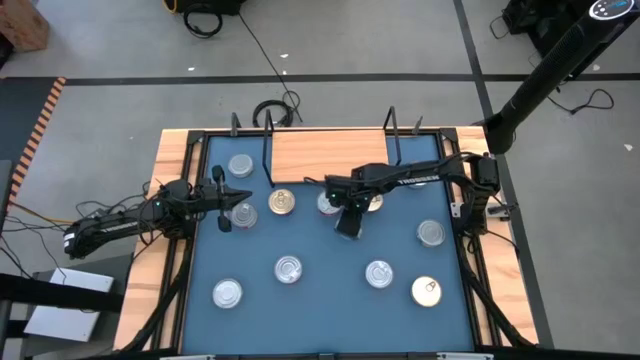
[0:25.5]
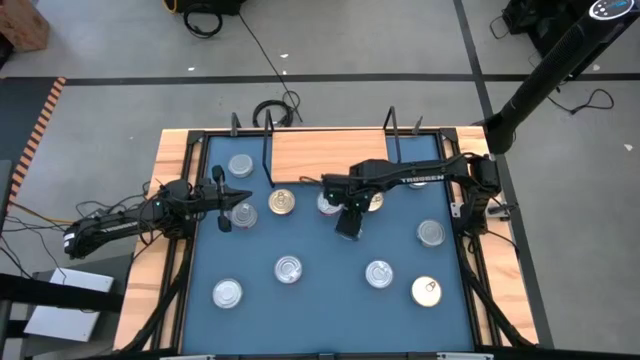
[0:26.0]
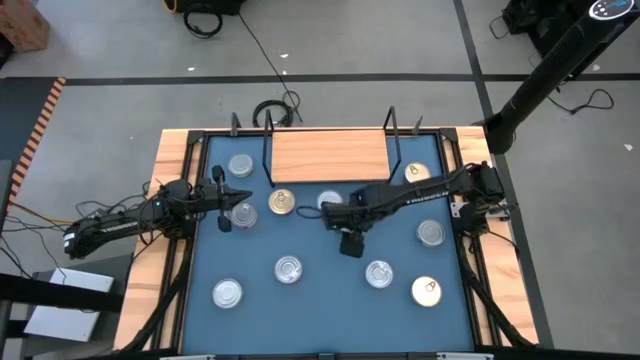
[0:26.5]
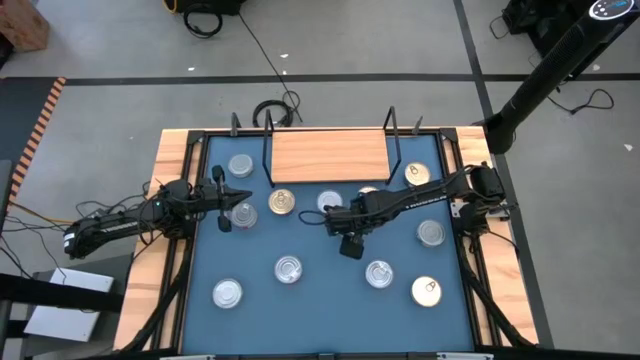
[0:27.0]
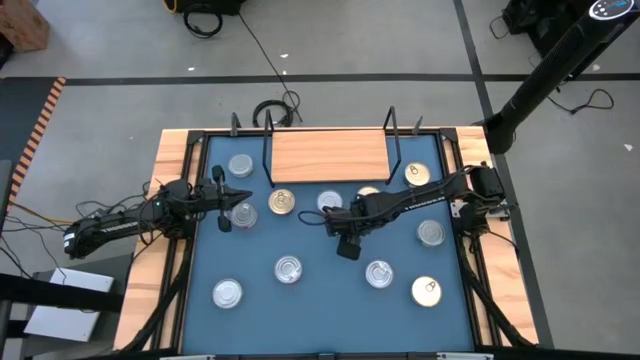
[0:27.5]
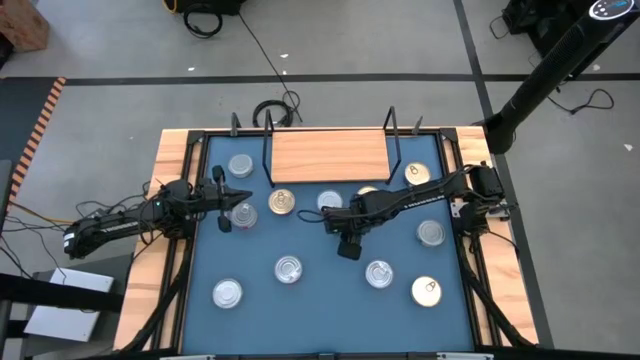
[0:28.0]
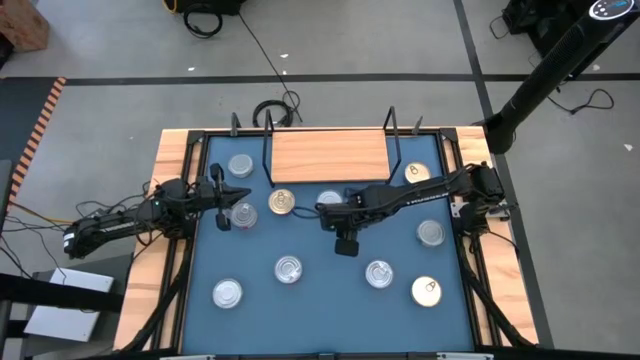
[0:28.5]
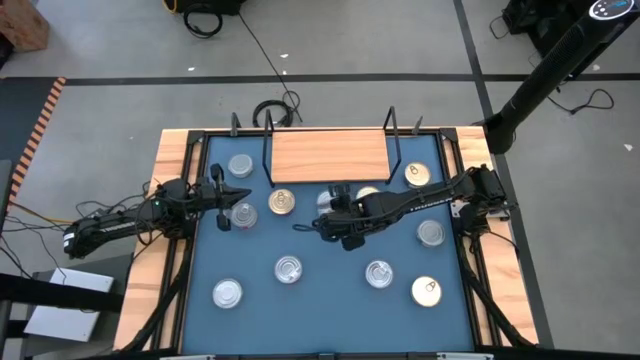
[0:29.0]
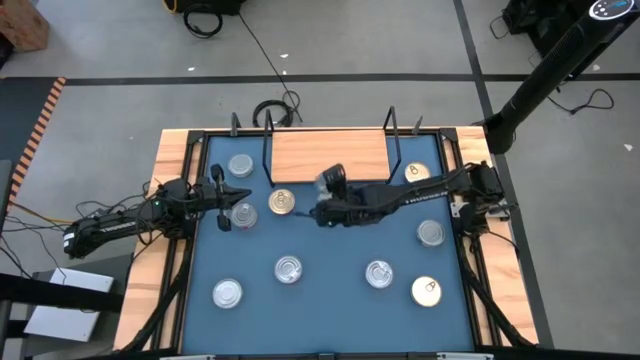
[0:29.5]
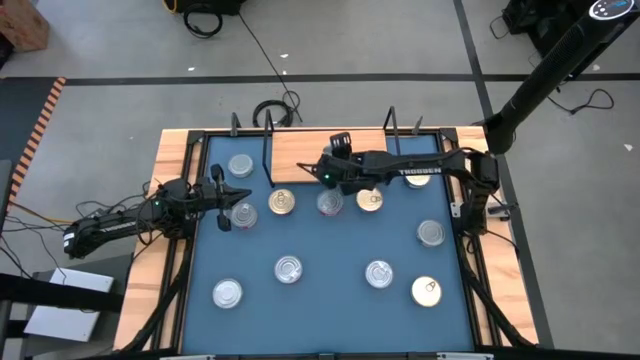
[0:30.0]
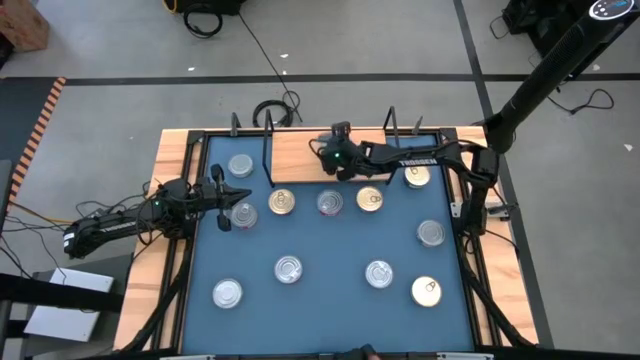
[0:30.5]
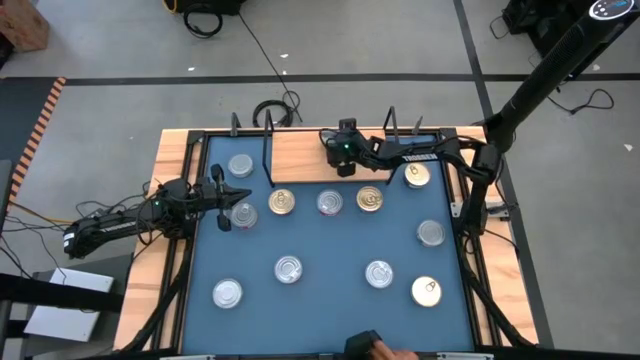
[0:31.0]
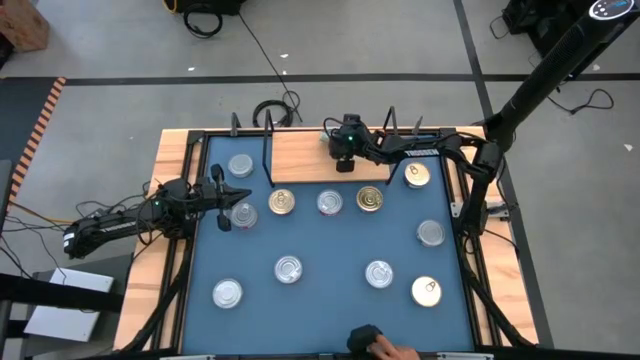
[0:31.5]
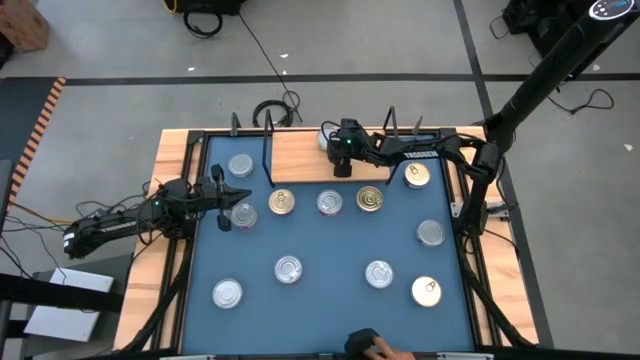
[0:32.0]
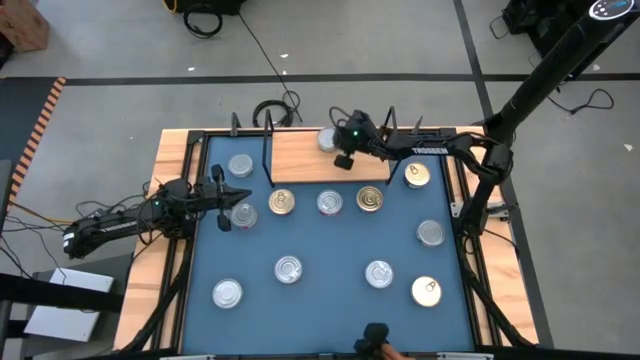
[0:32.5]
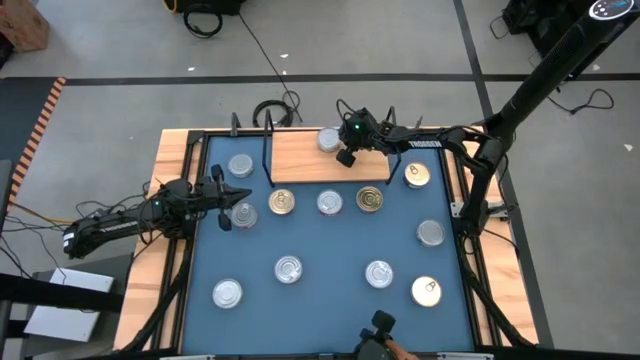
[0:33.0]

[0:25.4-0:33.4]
Task: Stack canned seafood by type on shelf
Put the green tuna can on the shelf

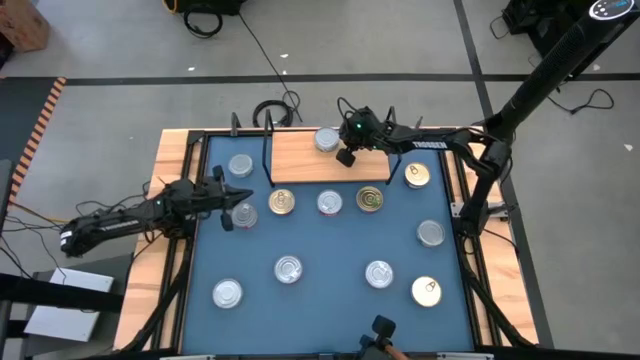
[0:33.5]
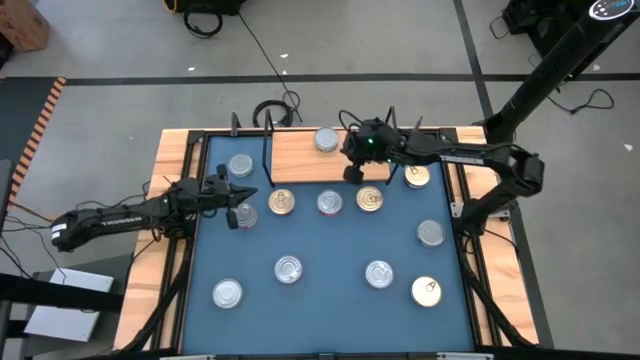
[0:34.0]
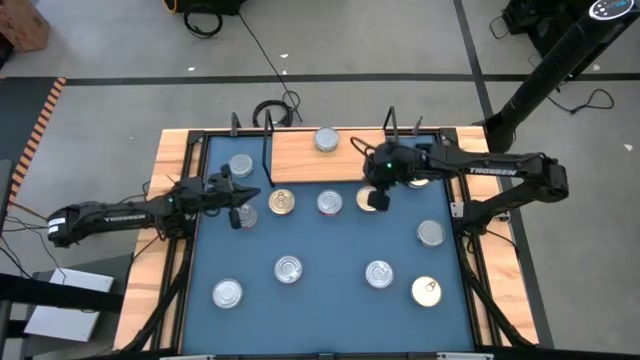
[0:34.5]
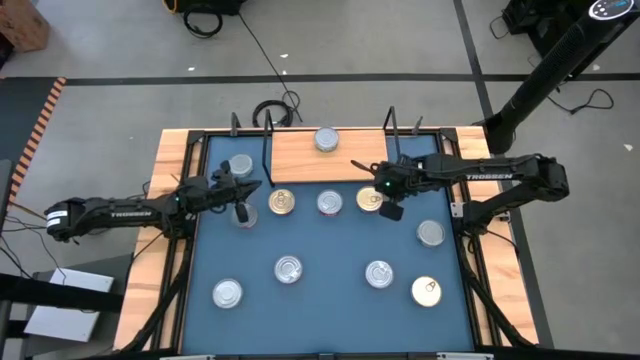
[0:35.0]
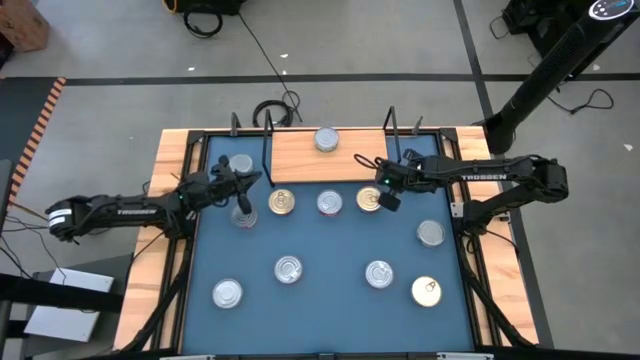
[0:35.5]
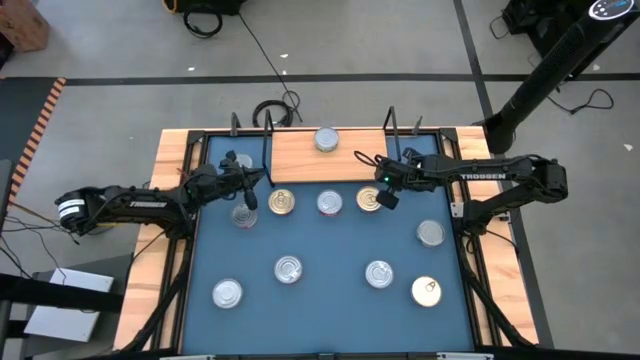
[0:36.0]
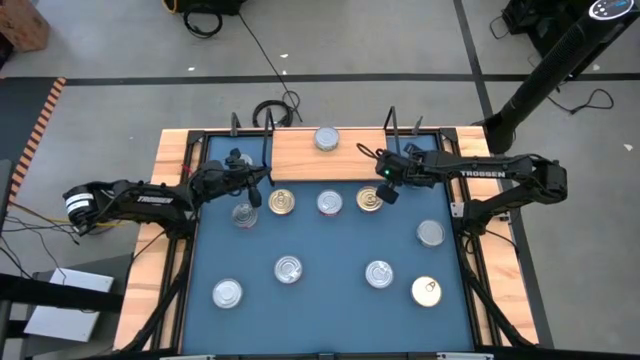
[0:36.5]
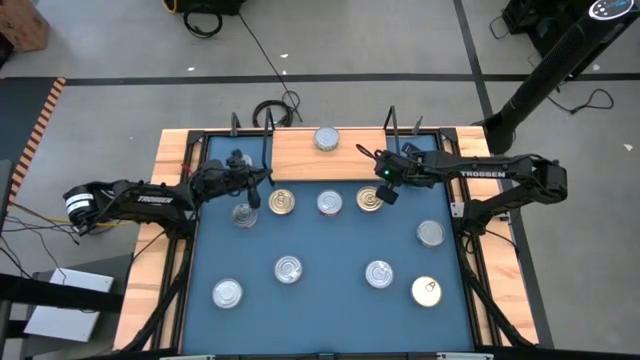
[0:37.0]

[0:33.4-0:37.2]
Adjust the shelf

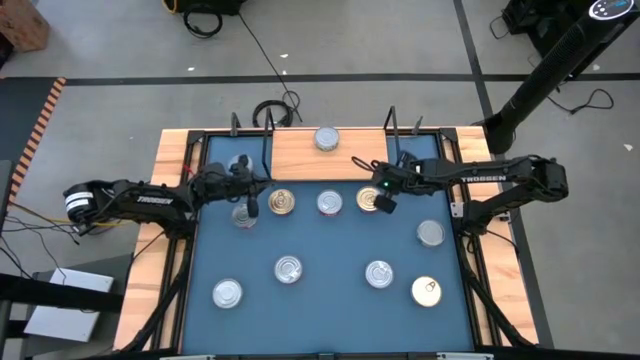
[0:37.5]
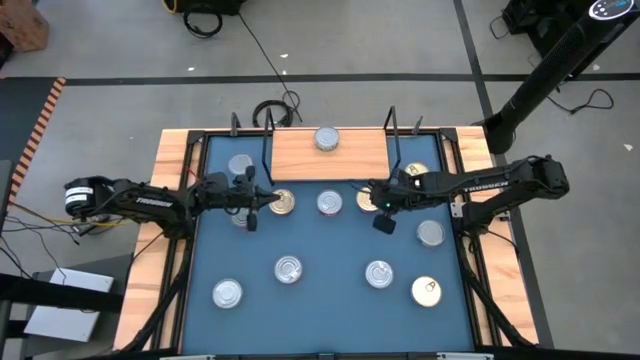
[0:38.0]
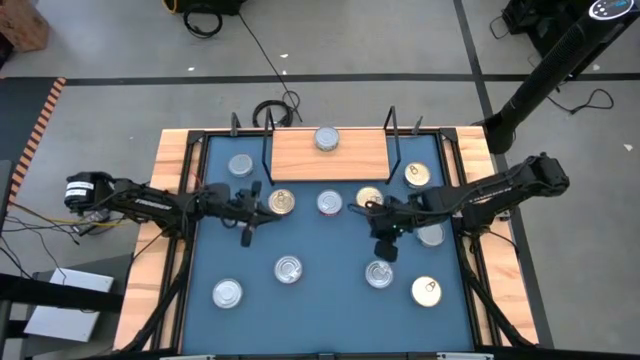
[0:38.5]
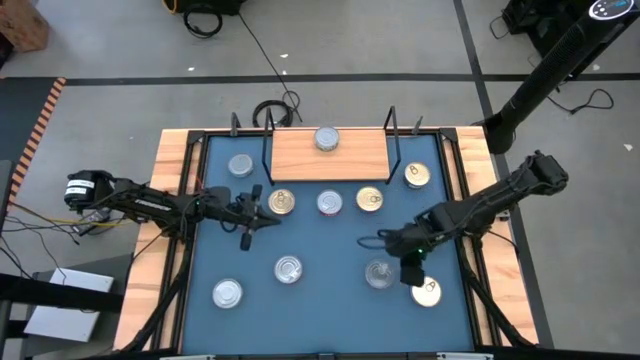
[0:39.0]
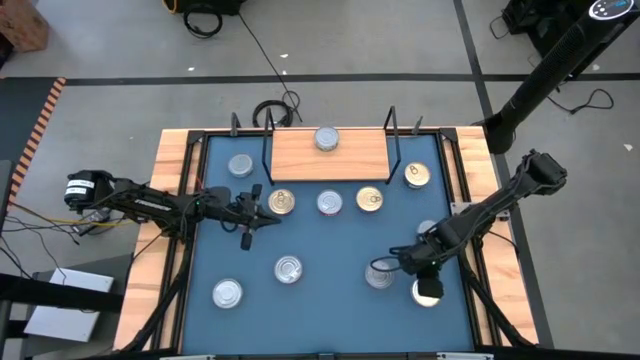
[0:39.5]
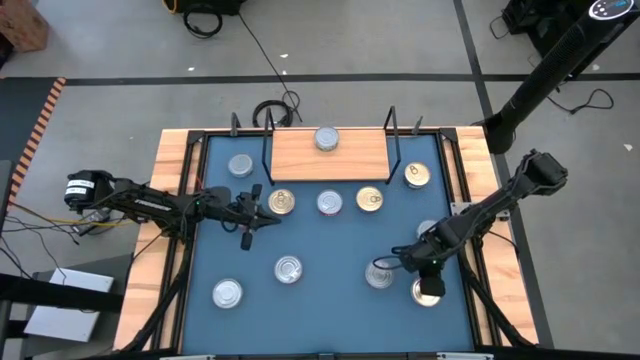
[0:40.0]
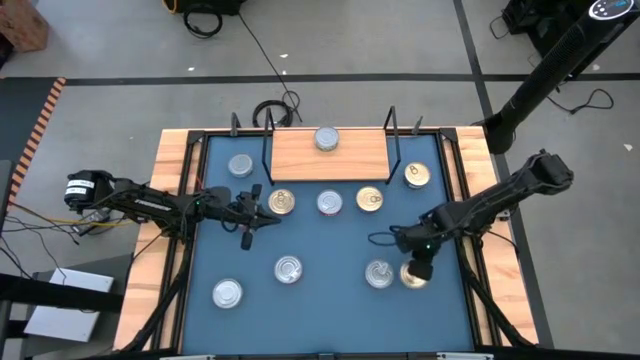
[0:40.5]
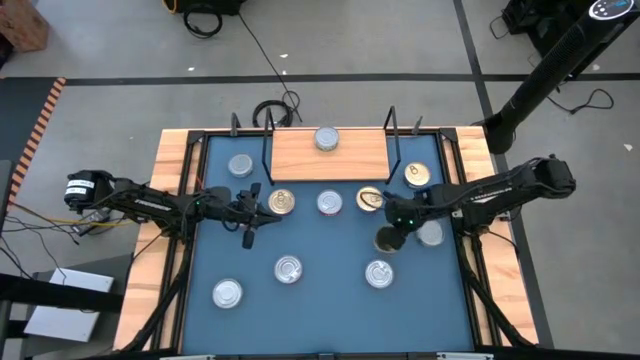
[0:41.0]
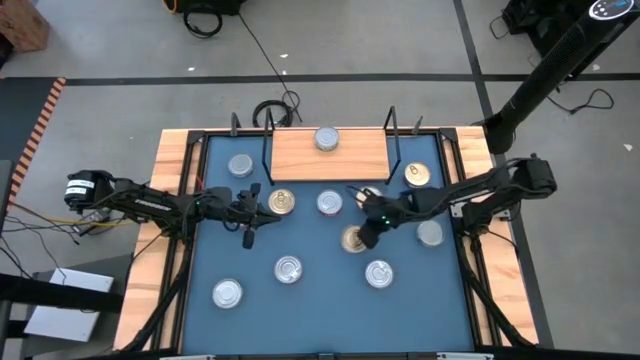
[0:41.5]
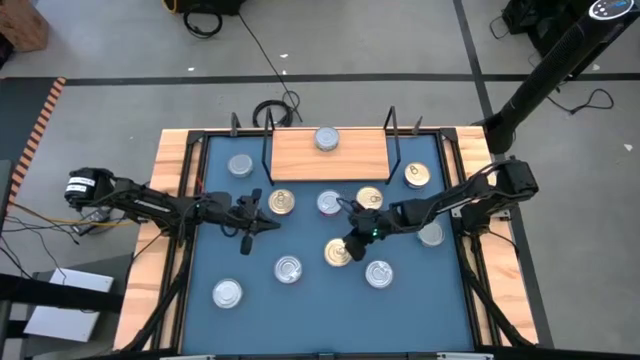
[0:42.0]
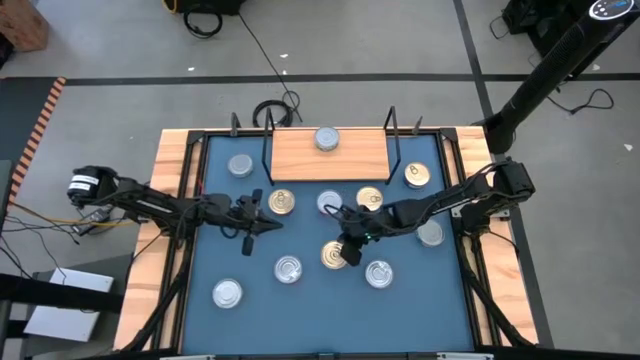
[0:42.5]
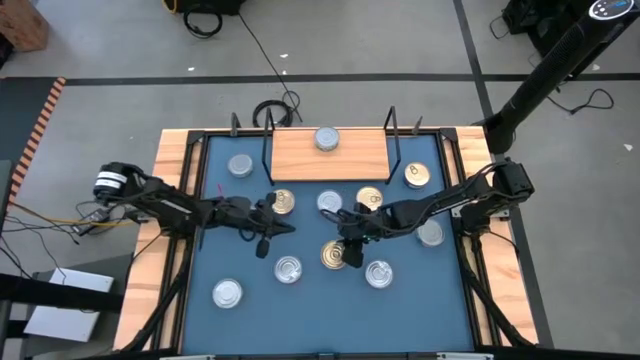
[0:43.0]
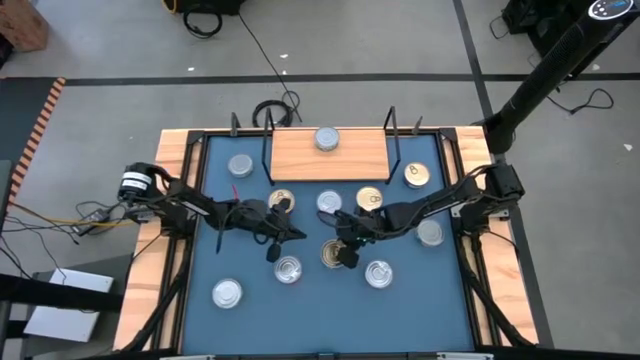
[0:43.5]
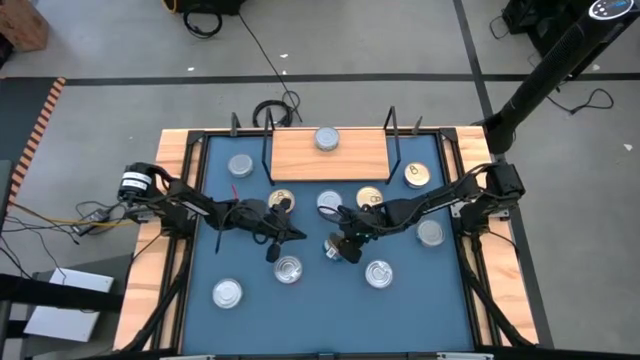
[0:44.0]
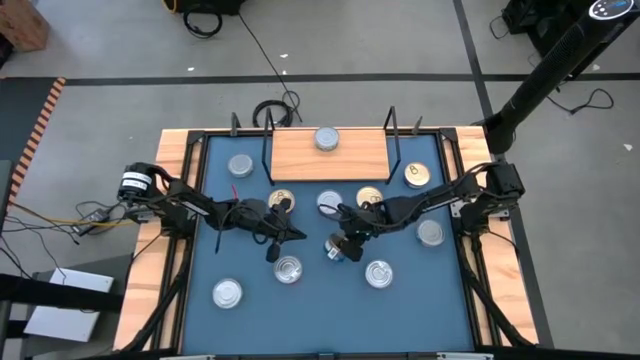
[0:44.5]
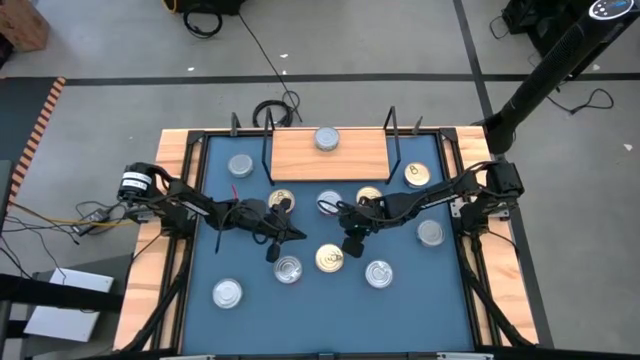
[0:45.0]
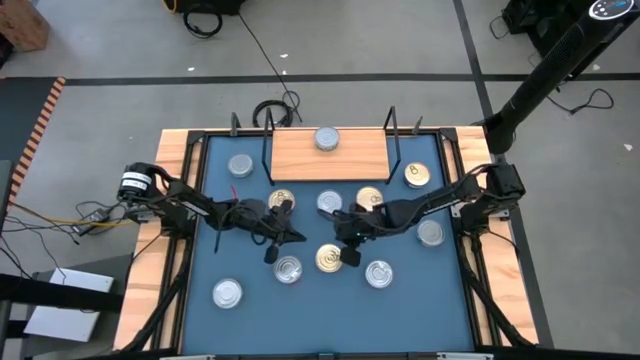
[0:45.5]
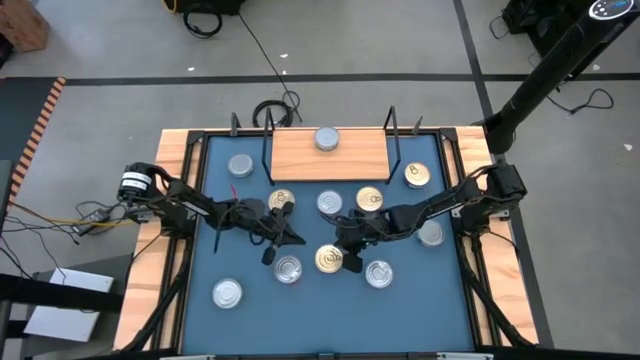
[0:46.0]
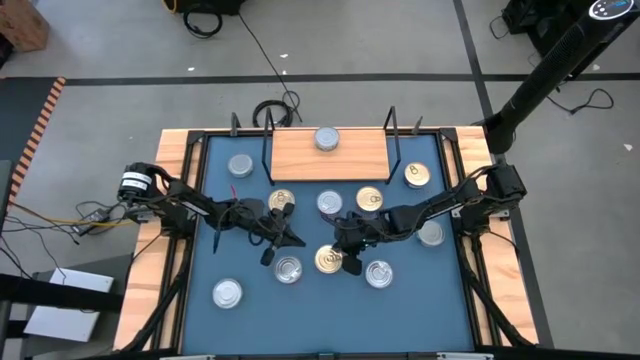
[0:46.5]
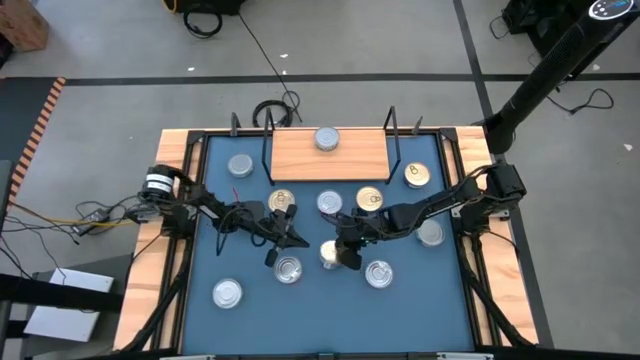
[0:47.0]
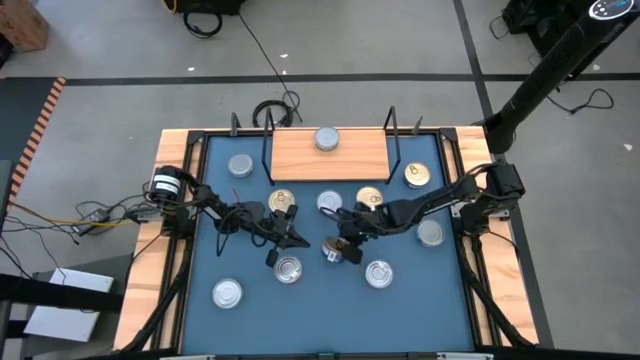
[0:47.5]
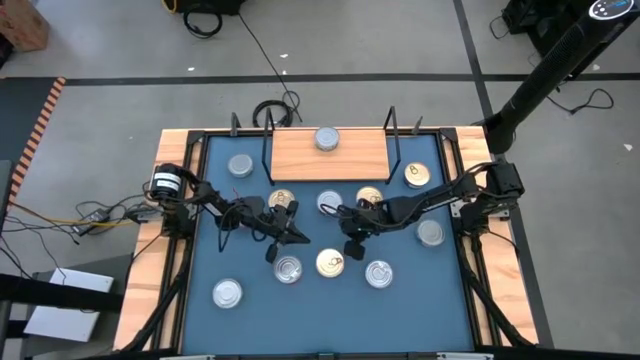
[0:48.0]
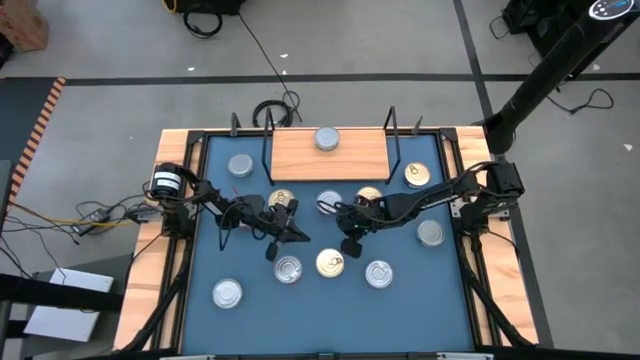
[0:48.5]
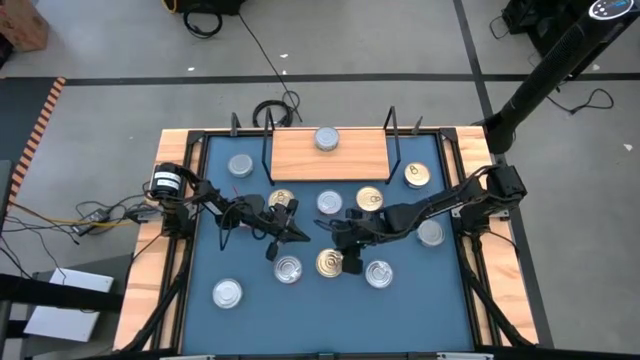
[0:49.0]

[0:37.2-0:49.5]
Put the blue tuna can on the shelf
